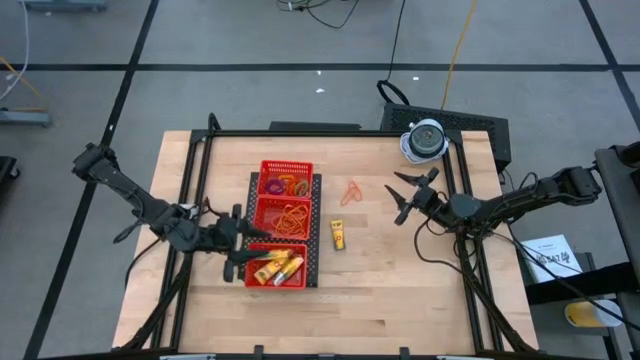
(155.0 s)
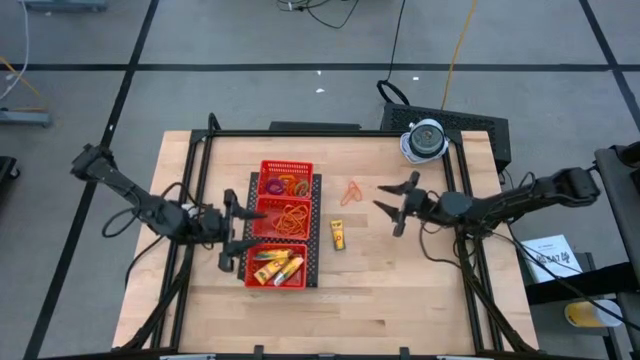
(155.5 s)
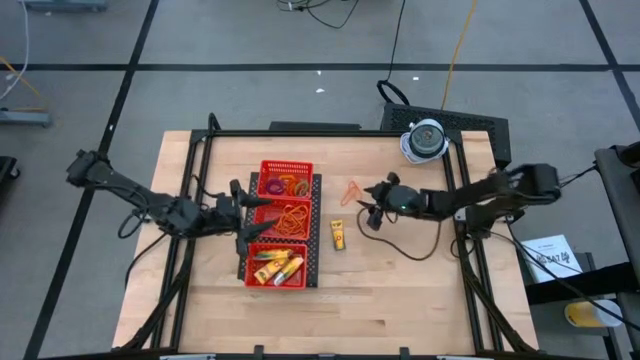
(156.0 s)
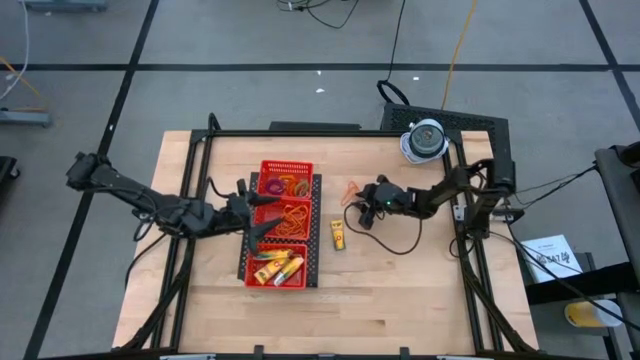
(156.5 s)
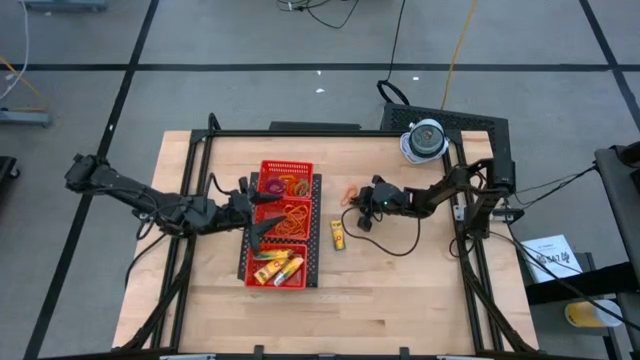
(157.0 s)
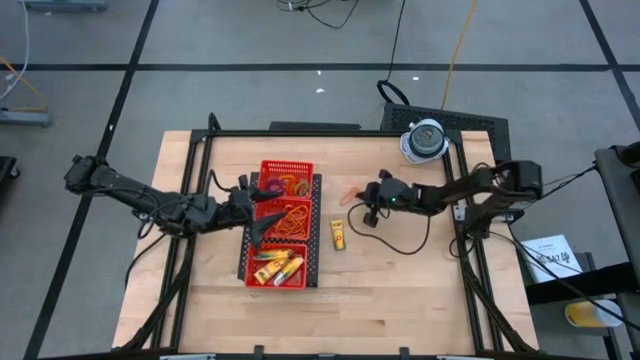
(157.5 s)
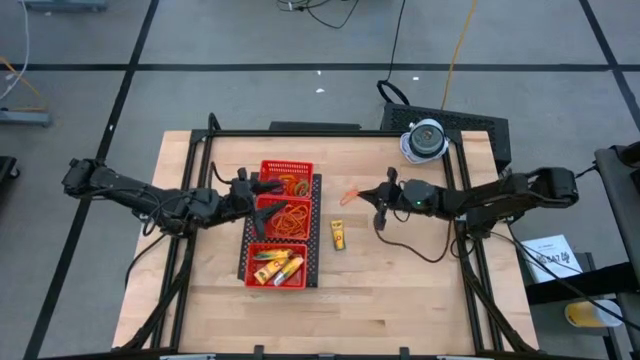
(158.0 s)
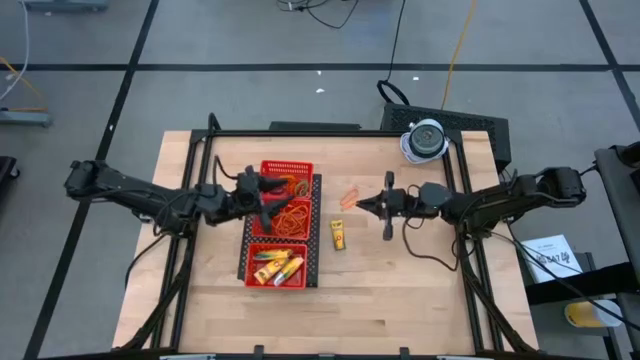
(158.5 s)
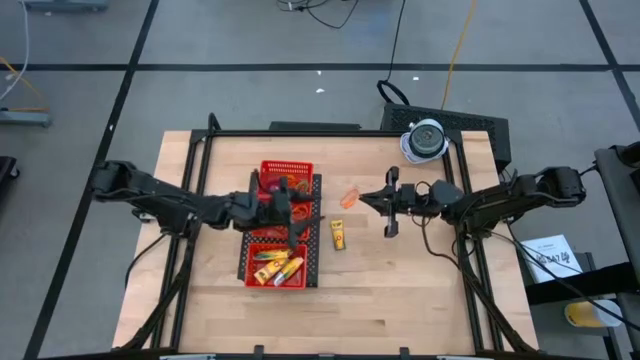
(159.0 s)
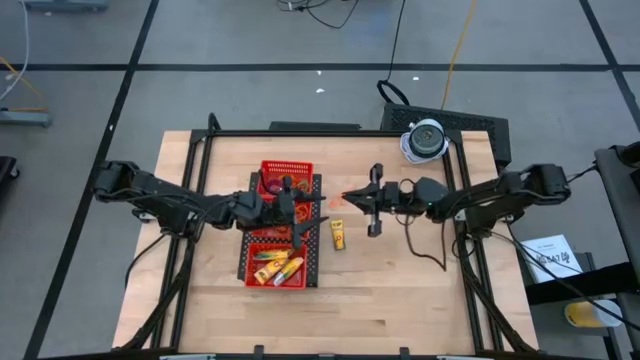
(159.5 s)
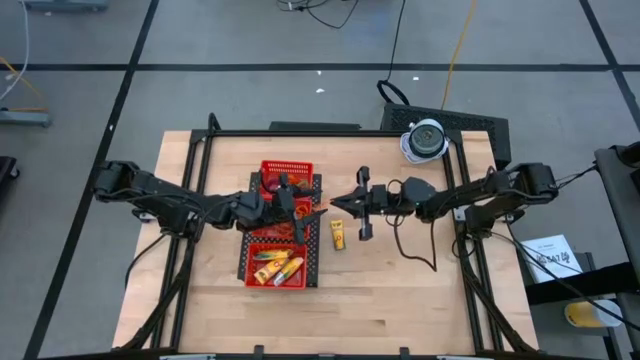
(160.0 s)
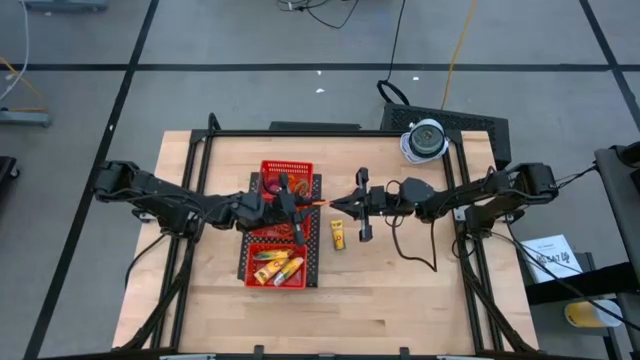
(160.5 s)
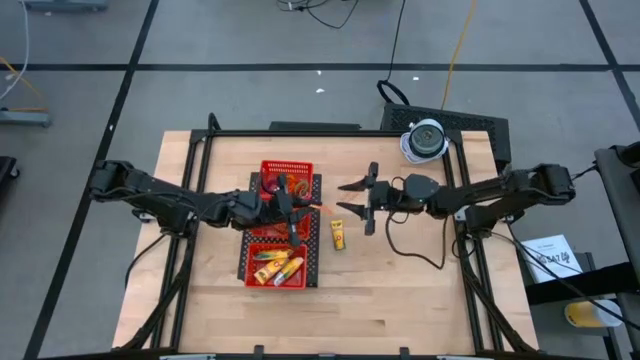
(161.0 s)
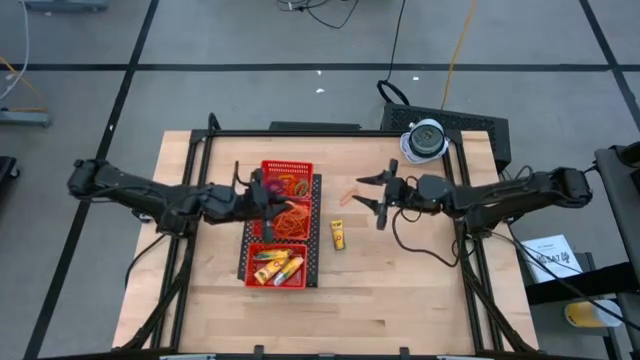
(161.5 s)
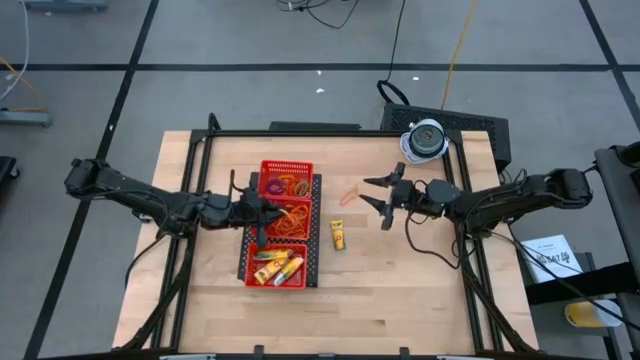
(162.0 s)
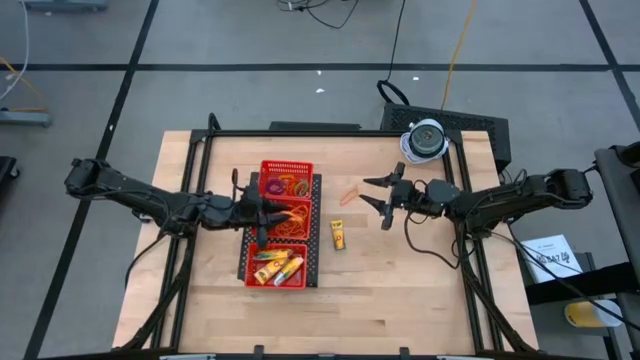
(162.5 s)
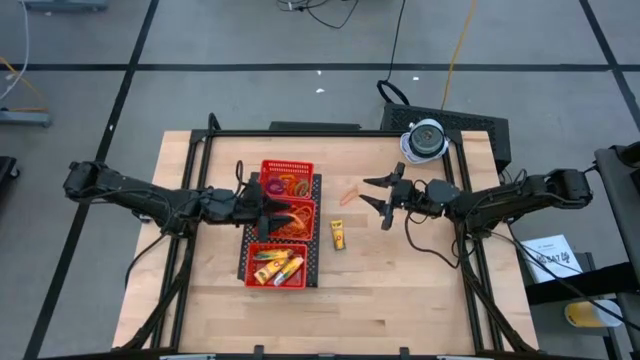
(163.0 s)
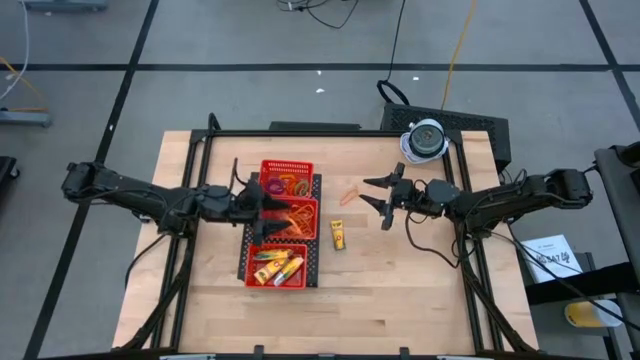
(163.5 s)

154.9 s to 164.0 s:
Task: Pick & Place Office Desk Supplies
Put the orange rubber band into the middle red basket on the shelf

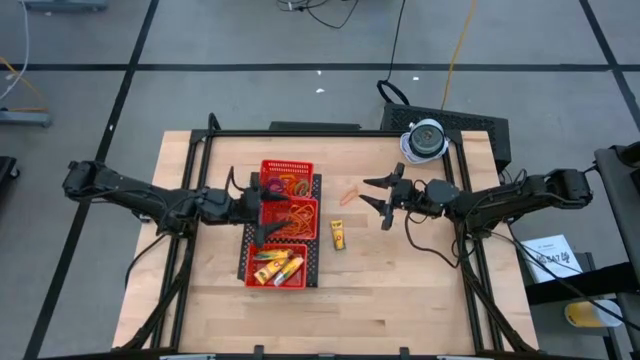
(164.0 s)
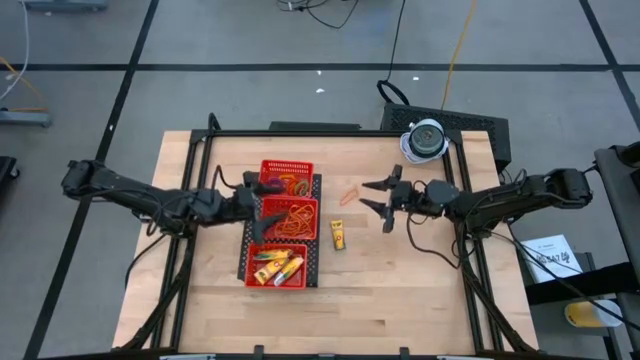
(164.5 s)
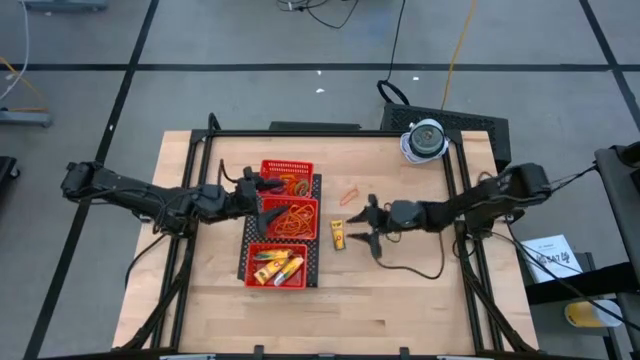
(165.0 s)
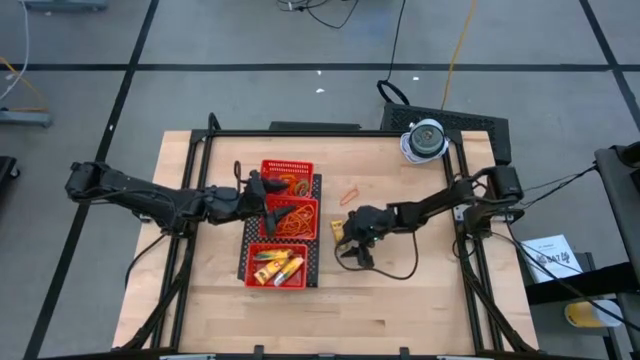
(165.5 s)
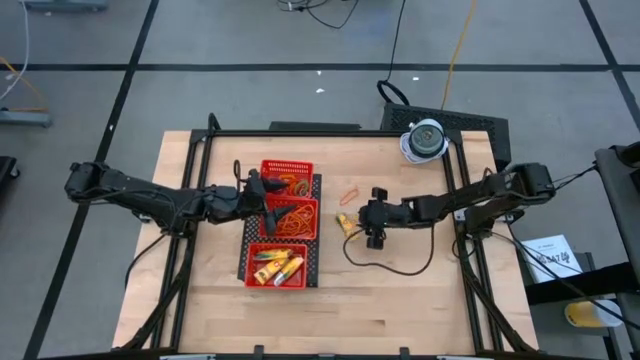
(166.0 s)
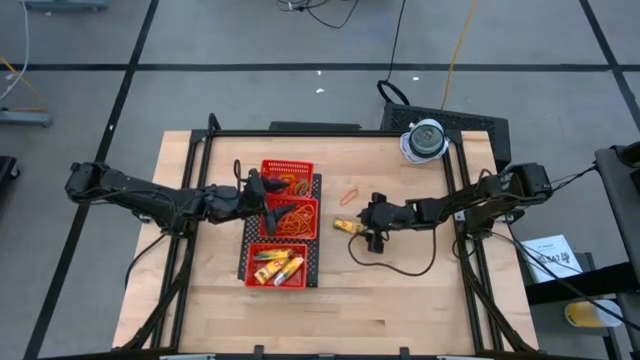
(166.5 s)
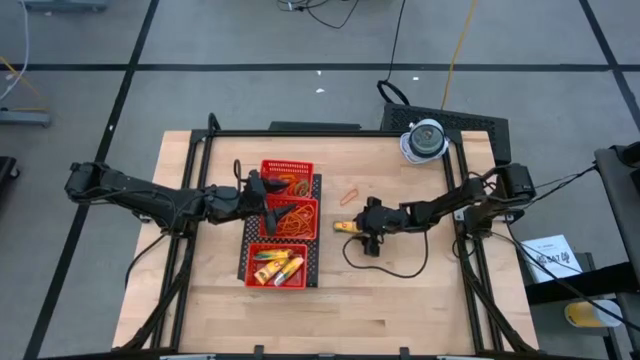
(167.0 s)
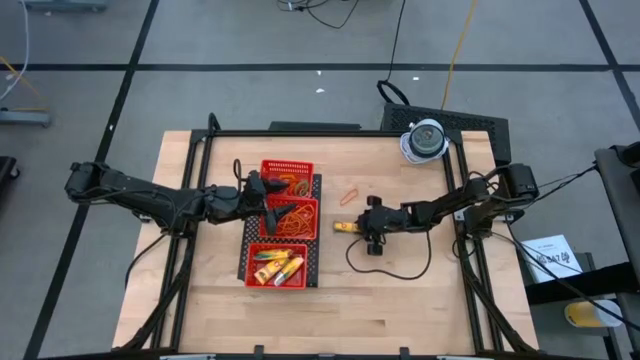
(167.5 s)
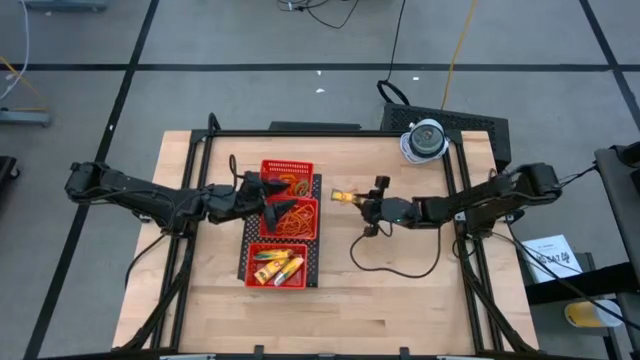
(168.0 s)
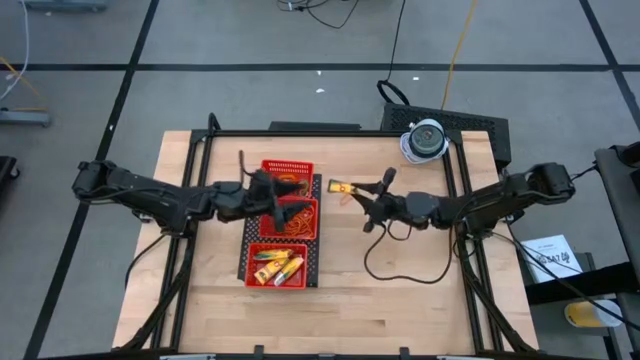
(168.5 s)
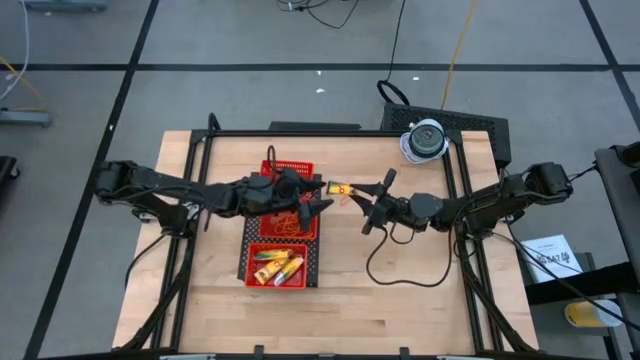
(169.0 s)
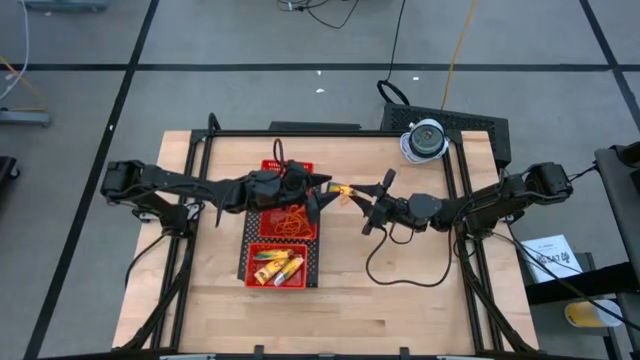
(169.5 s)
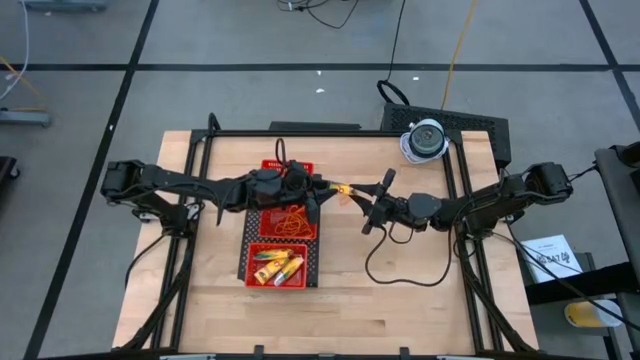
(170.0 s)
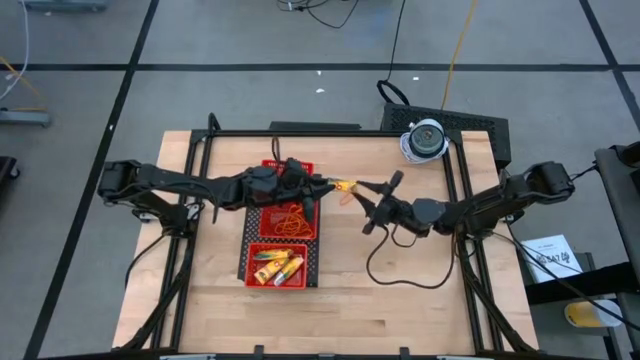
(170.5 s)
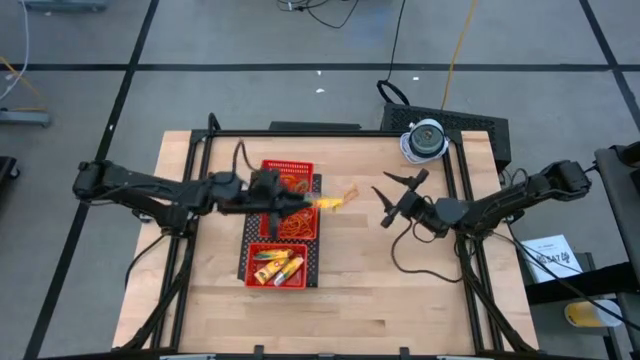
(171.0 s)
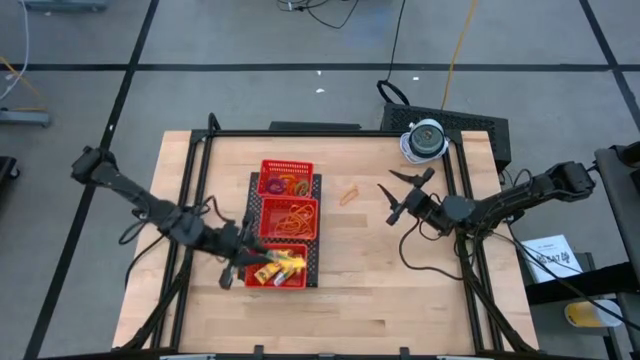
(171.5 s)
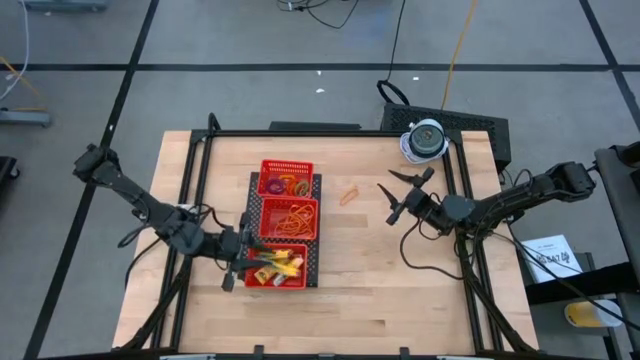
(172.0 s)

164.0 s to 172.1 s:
Put the yellow pack of crayon into the bottom red basket on the shelf

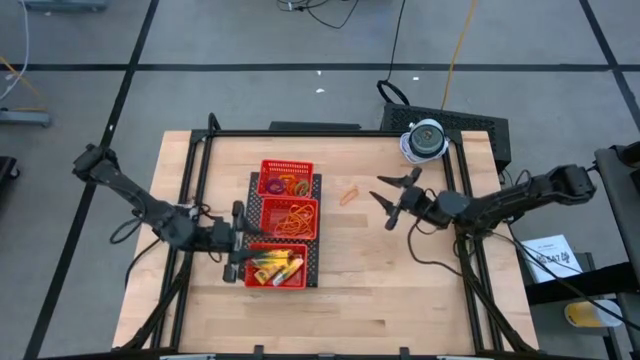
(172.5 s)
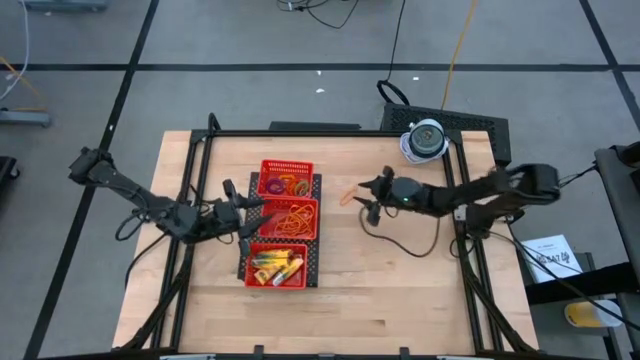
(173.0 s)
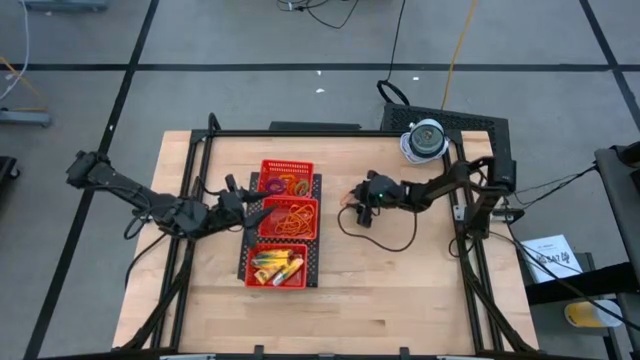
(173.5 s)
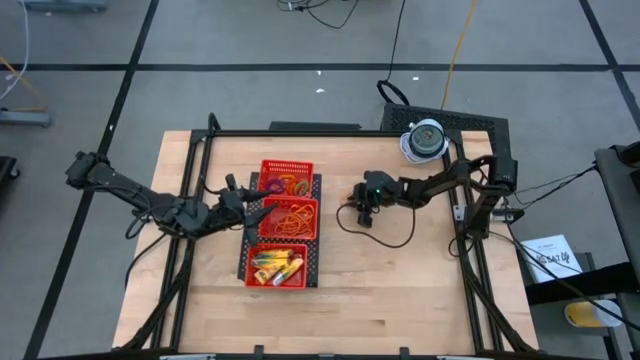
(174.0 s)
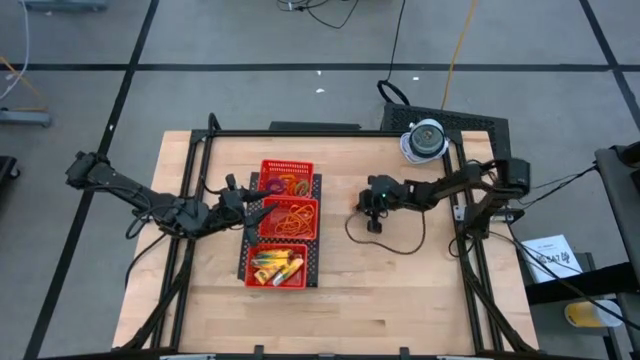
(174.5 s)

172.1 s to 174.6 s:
Put the orange rubber band into the middle red basket on the shelf
